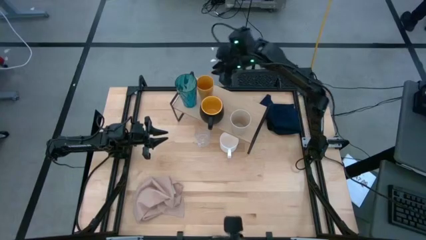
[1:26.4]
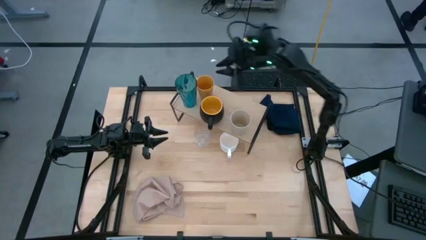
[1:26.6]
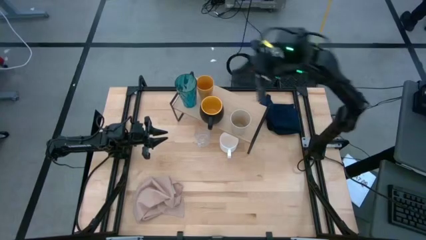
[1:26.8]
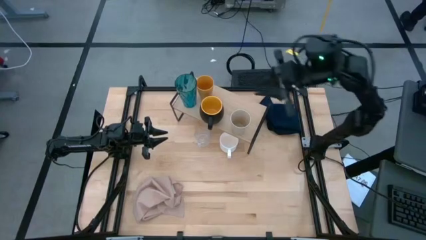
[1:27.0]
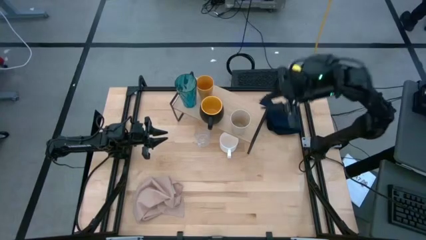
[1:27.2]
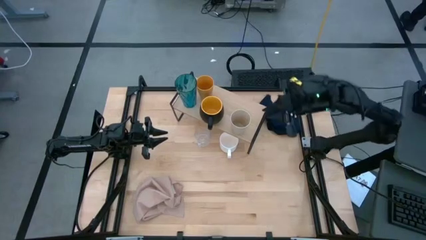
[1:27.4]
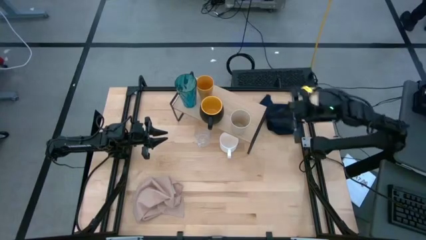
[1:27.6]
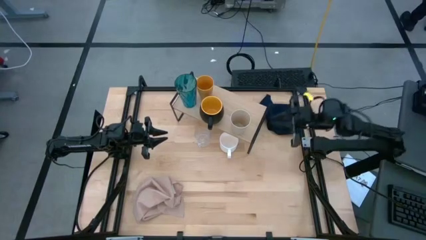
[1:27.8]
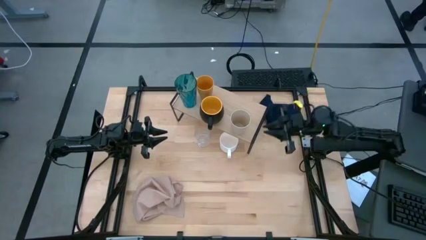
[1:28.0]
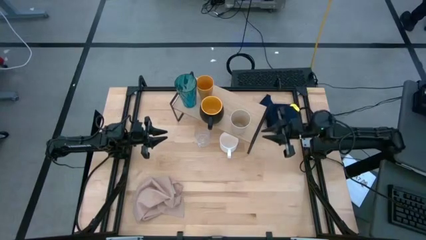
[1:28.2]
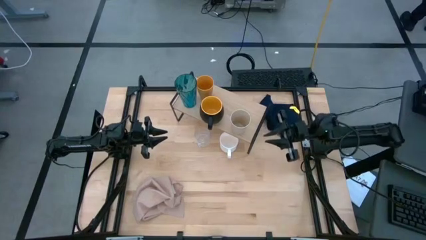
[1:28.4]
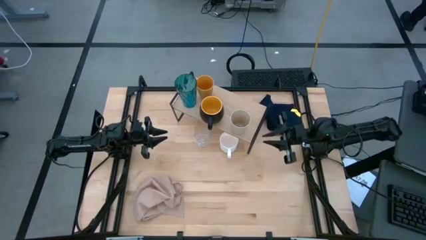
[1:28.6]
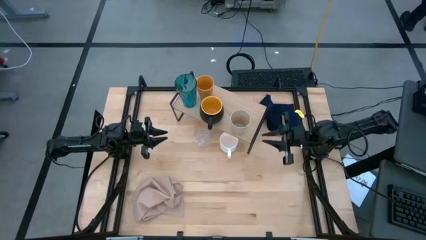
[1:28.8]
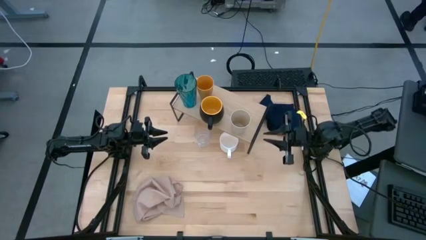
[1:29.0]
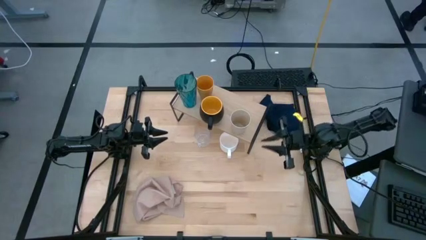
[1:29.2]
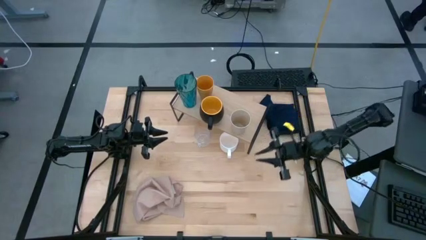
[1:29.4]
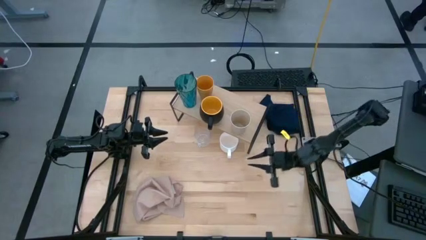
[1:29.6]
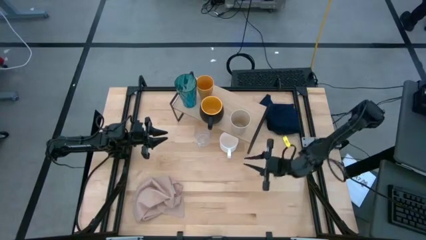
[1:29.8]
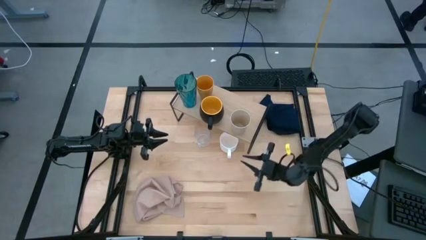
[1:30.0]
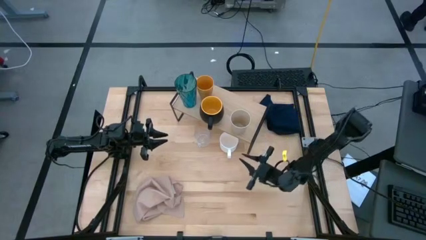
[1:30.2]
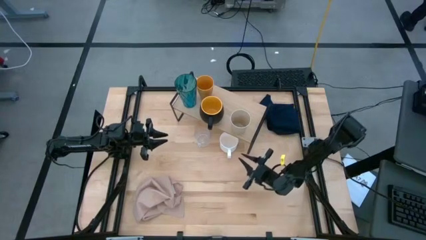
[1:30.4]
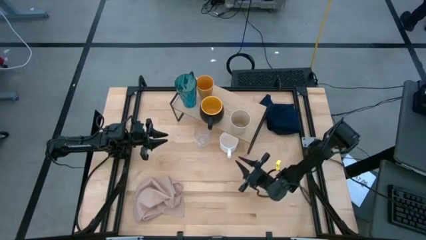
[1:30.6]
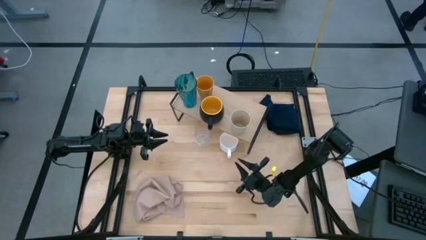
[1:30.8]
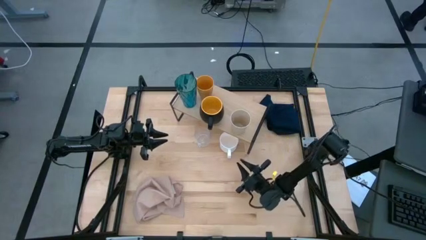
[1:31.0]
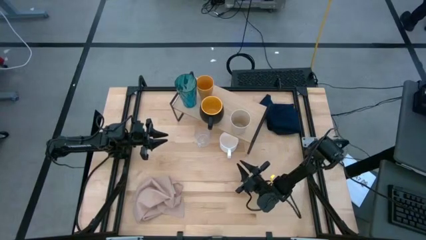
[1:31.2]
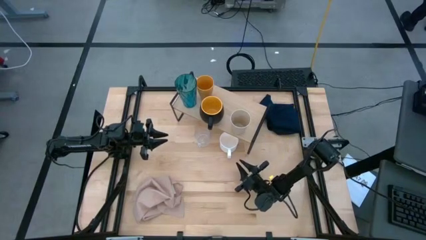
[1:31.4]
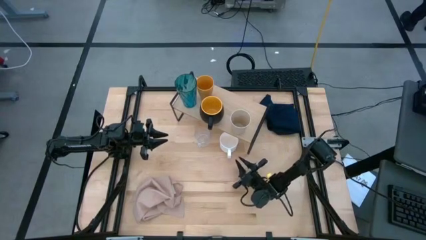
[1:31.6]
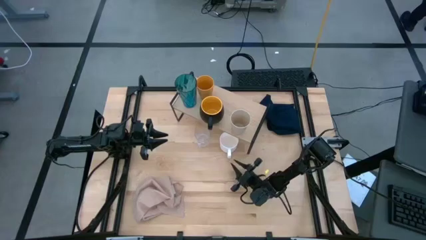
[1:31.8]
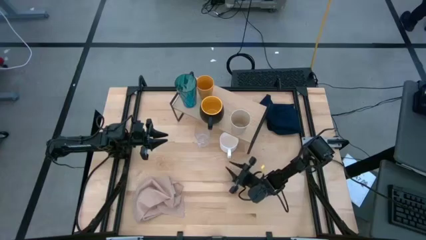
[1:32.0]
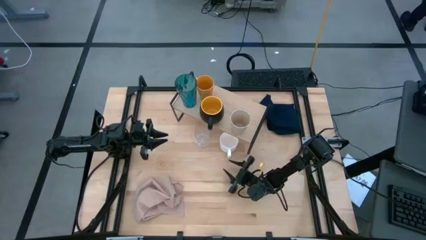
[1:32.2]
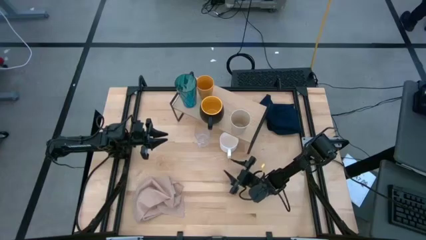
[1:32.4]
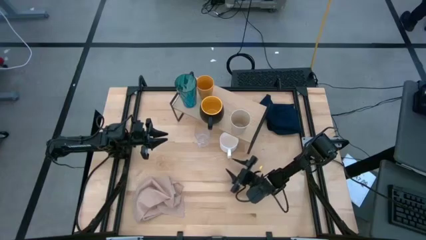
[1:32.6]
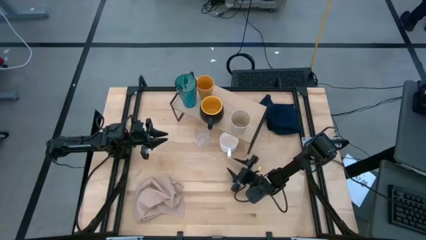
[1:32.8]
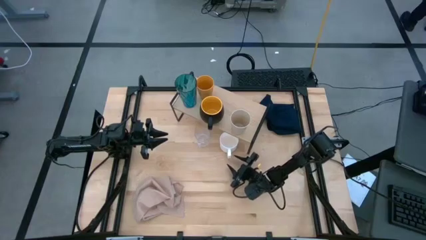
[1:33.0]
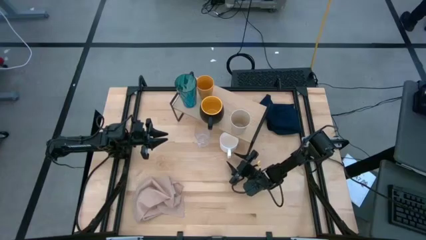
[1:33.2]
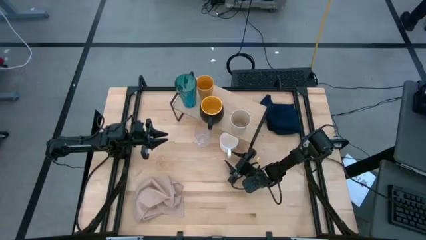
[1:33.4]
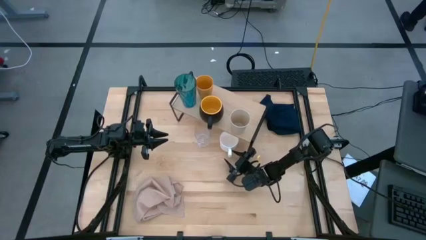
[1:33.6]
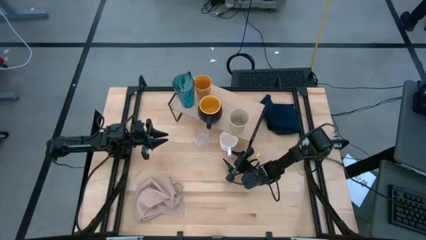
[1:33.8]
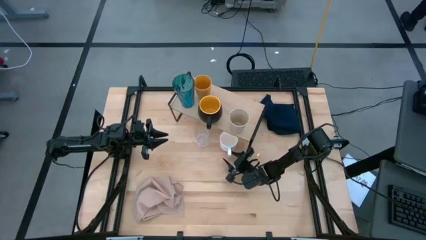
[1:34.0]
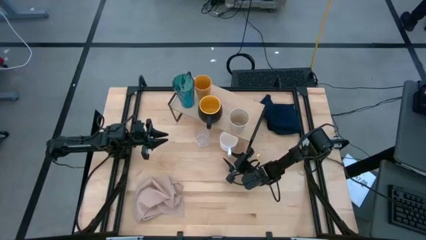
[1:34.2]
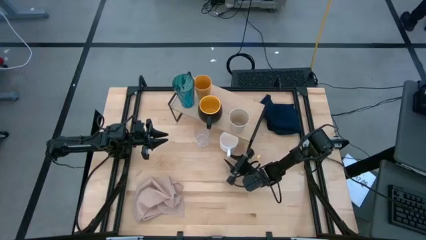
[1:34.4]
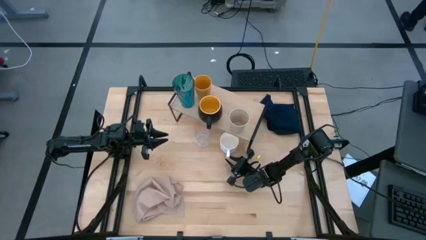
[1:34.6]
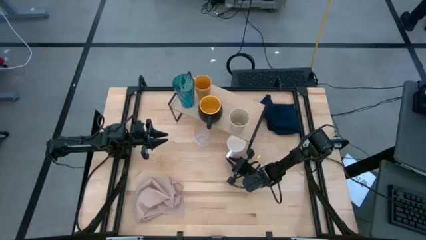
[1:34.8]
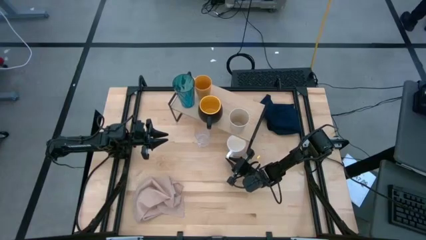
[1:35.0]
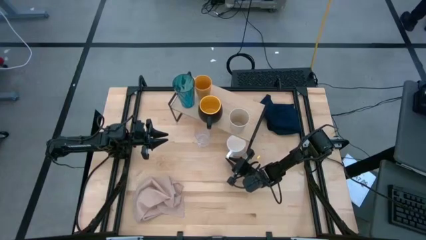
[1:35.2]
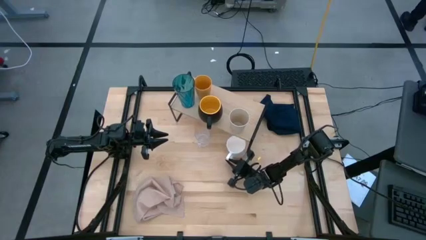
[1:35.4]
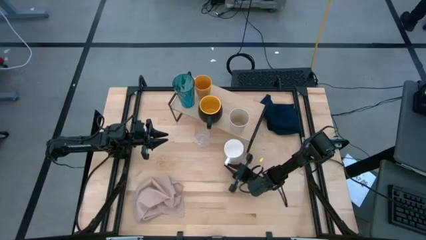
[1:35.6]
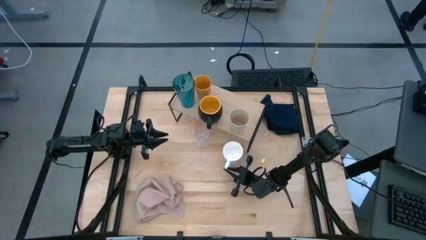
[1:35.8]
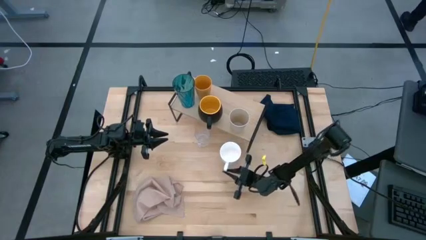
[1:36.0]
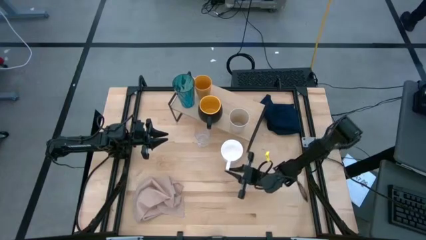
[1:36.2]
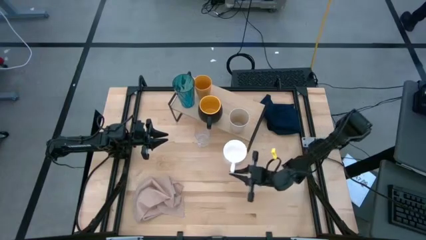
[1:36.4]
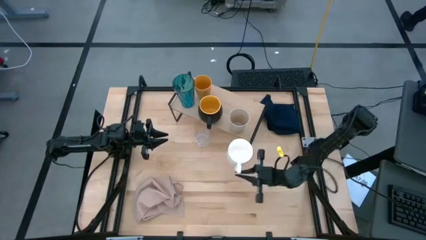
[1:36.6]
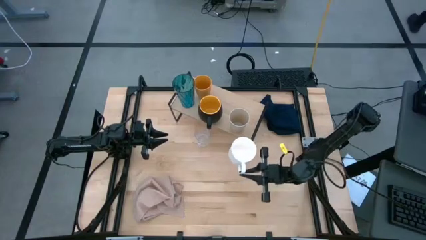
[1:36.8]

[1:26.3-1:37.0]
Task: Stack small to large cups/mugs on shelf
Put the white mug on the shelf

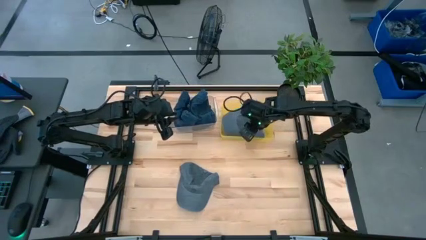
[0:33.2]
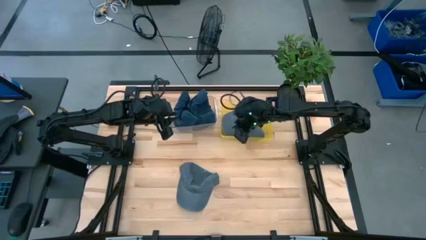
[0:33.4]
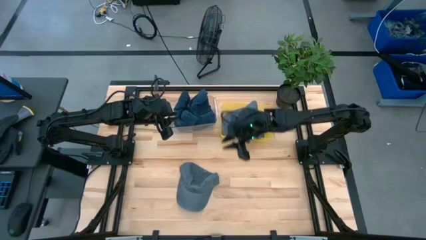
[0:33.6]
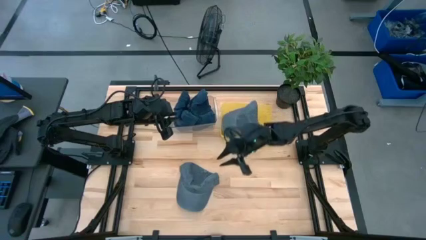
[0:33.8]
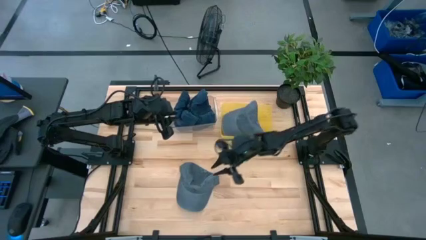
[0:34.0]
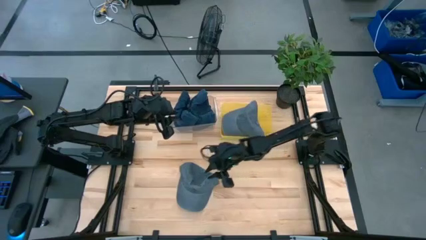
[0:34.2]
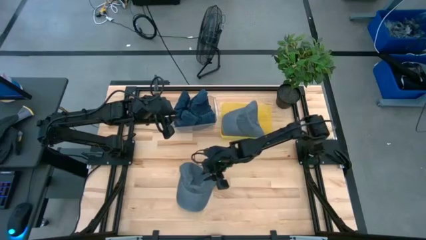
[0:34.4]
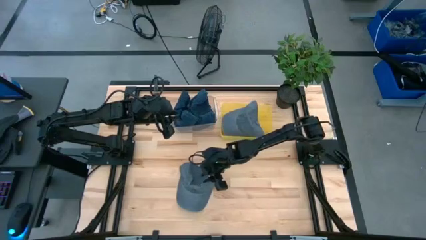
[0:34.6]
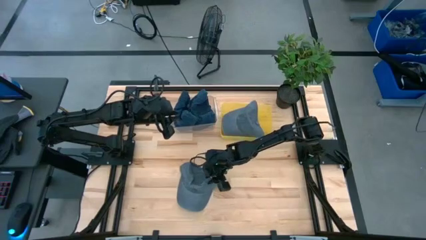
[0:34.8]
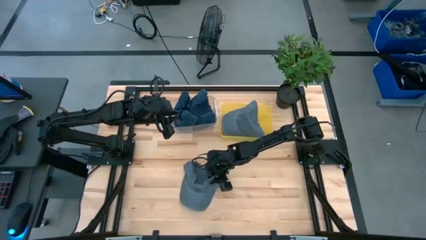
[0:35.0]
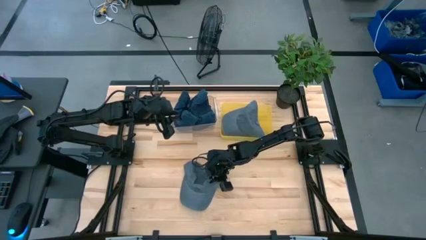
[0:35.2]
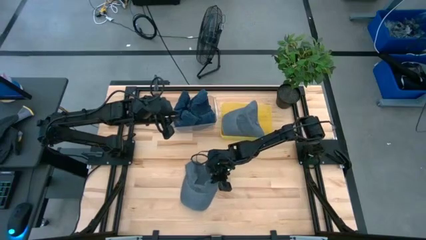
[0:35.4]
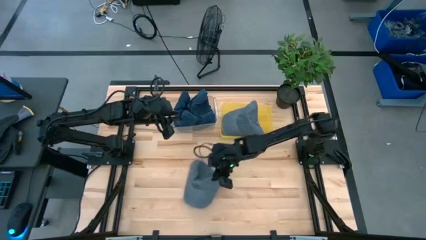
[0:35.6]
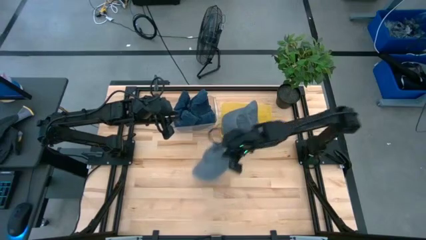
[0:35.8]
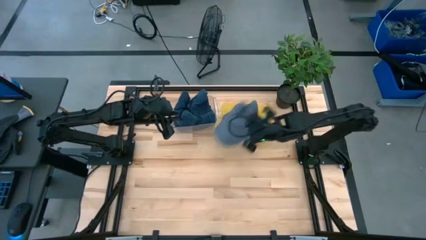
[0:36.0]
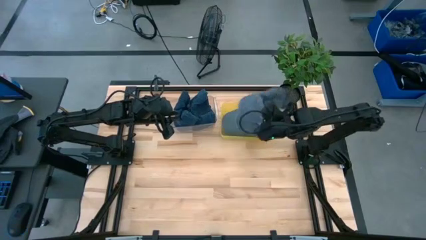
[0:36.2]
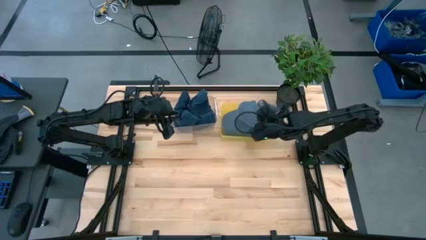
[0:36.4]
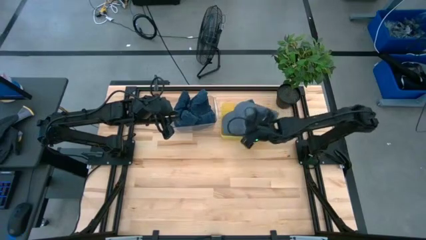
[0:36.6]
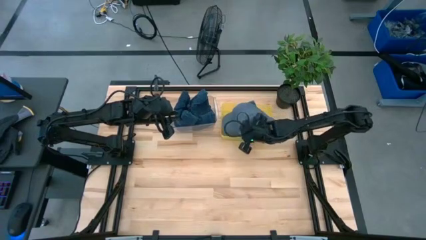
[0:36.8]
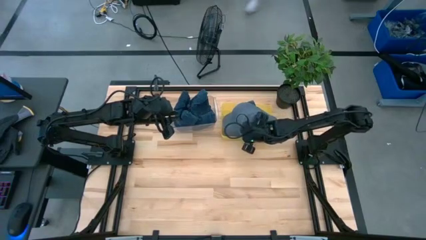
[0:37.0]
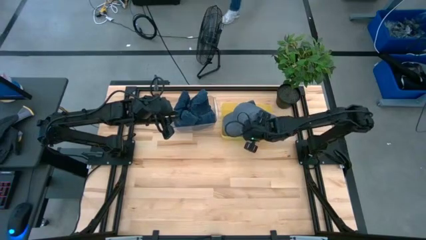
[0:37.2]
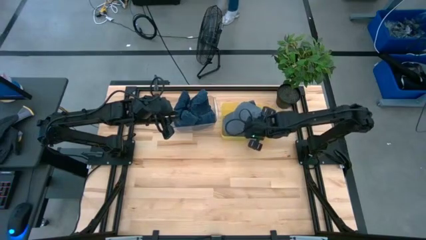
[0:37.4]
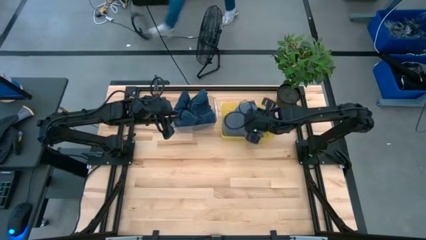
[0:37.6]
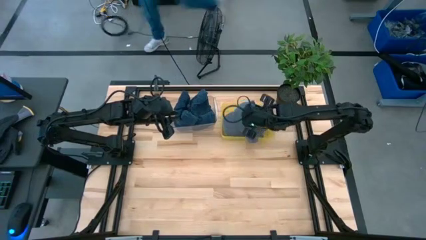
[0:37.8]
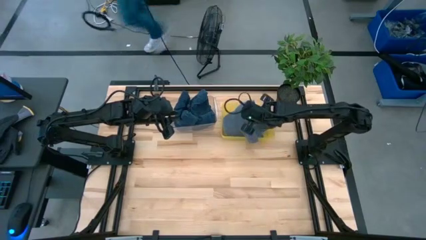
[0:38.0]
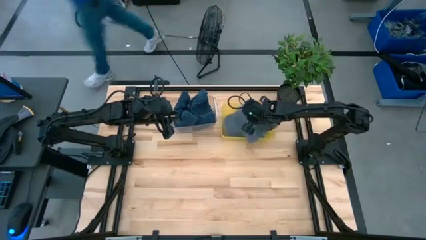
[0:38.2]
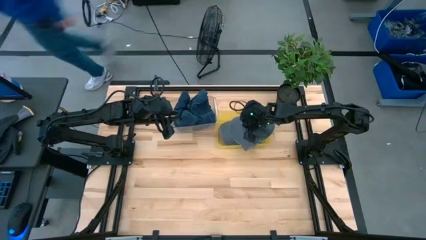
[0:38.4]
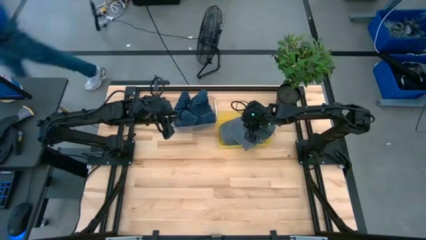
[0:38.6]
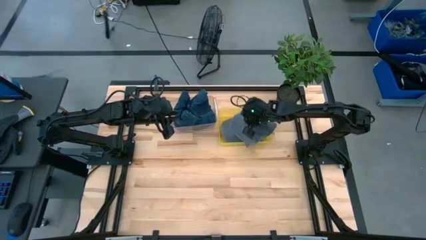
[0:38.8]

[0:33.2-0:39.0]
Task: Pick & Place hat
Put the gray cap into the yellow bin
